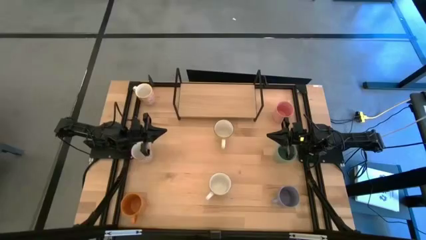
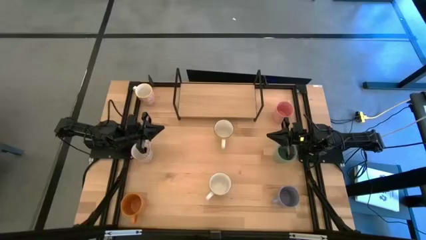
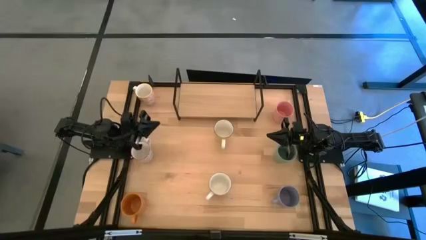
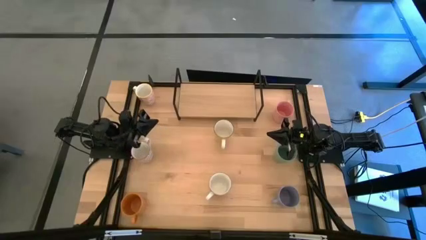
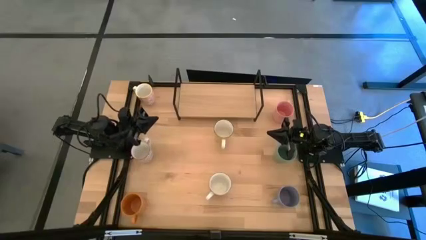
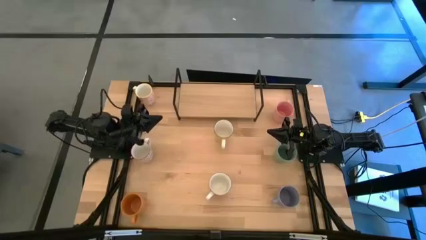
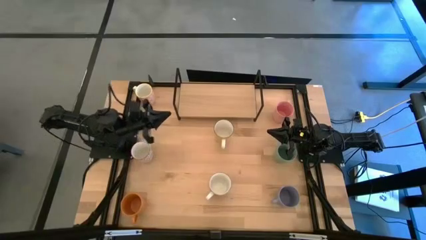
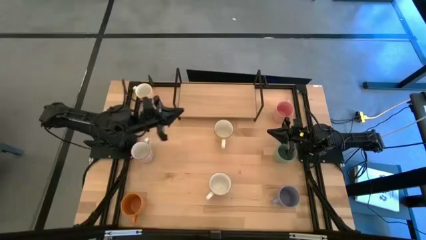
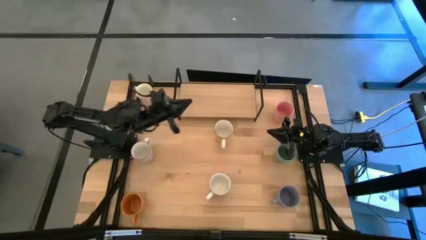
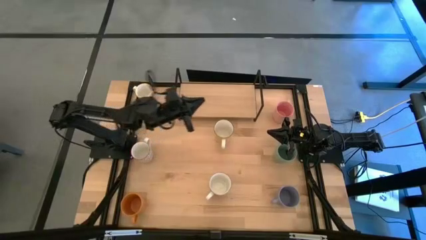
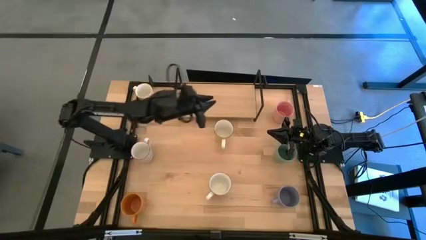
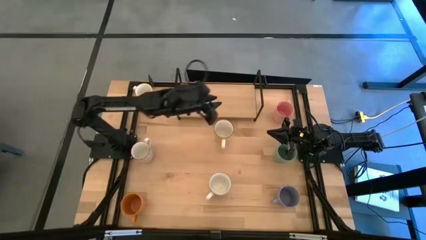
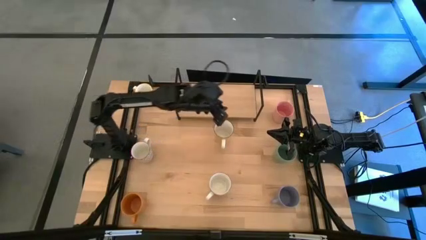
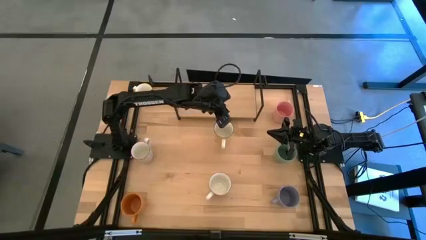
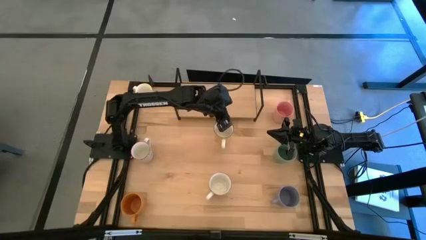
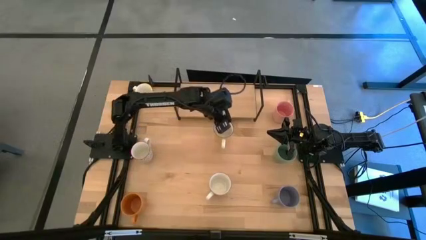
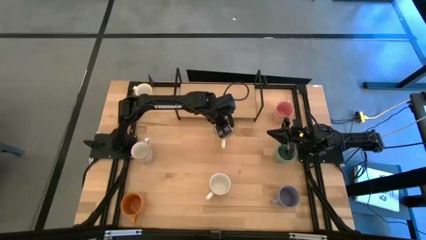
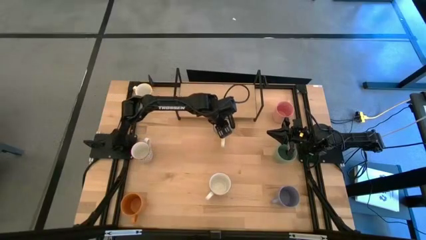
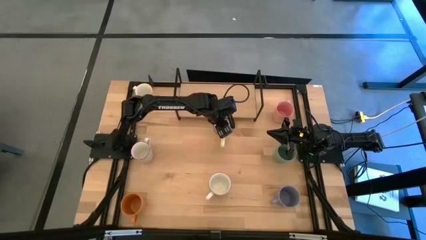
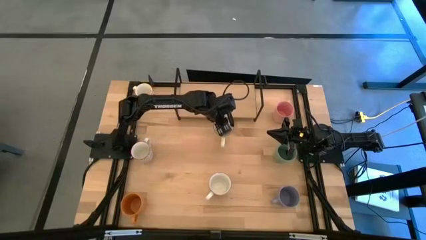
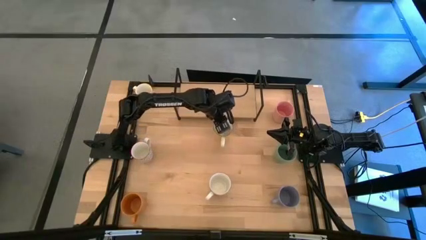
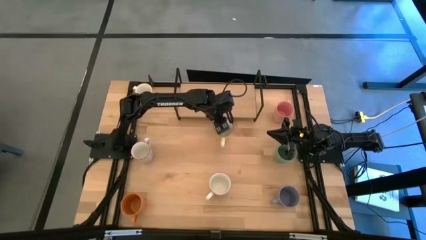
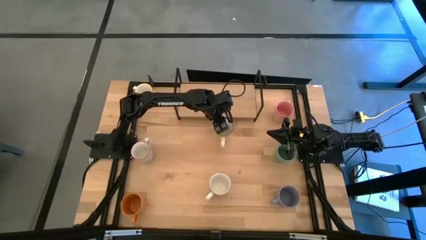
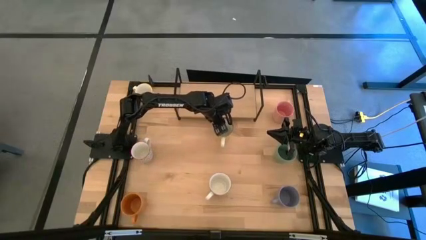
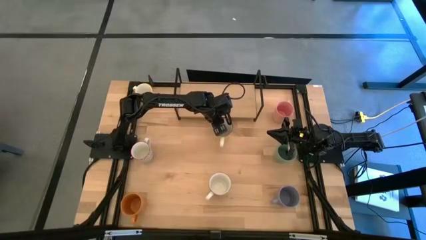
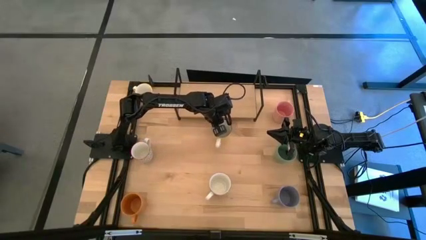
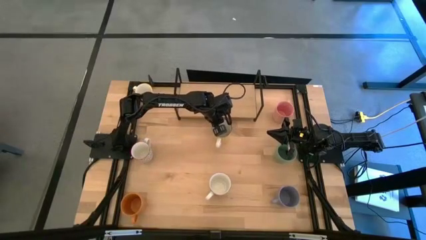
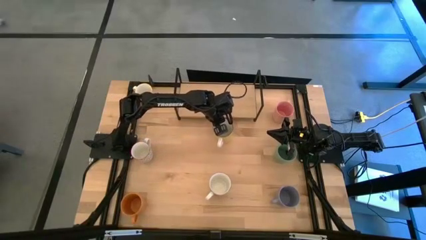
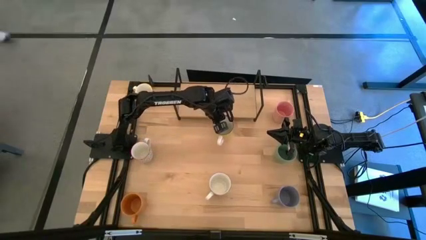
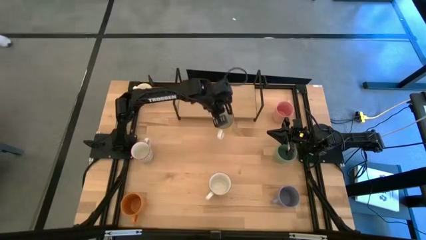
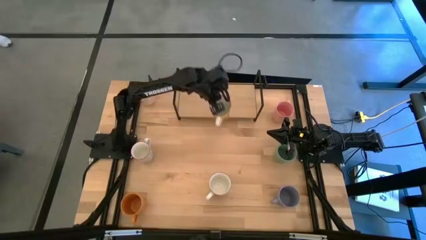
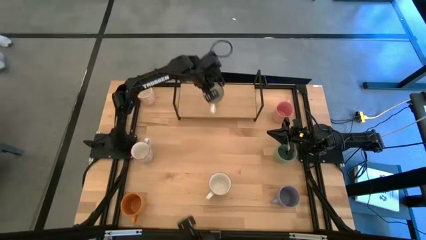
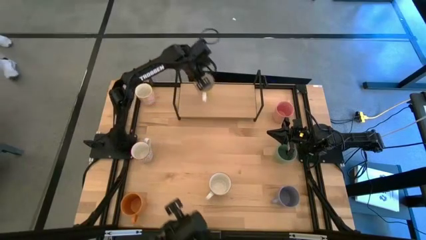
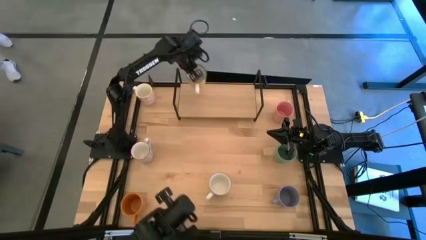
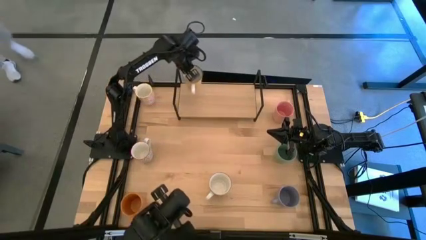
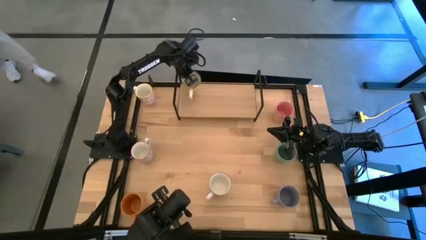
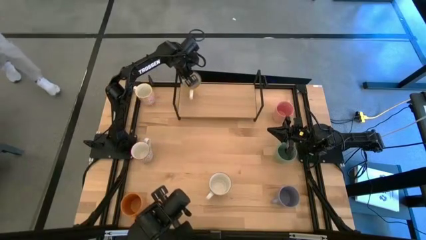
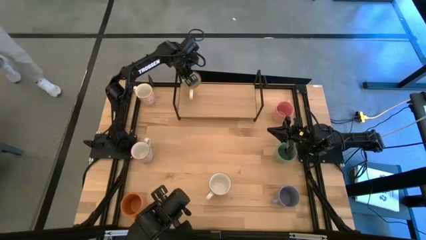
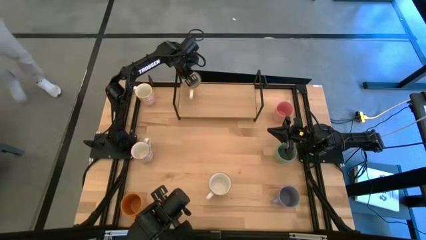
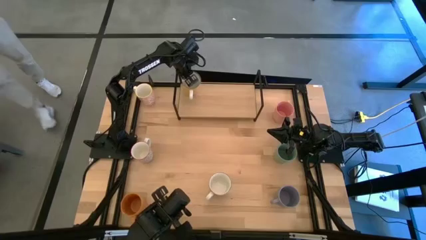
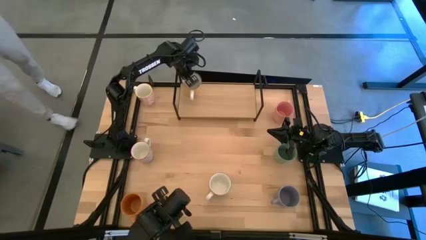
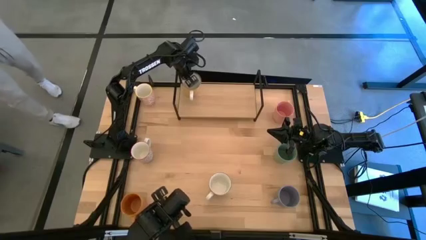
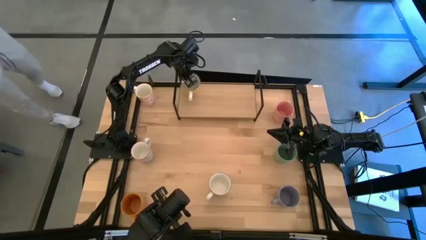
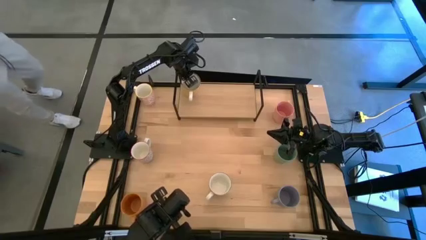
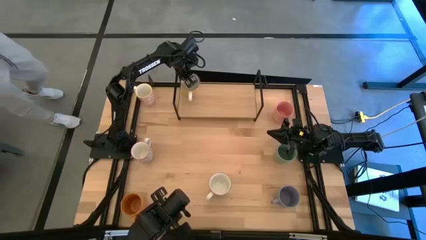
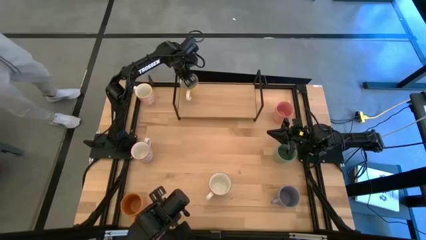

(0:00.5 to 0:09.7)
Task: Place coffee mugs
Put the yellow mug on the shelf

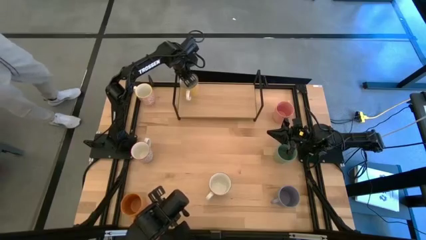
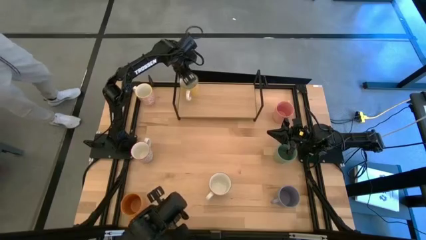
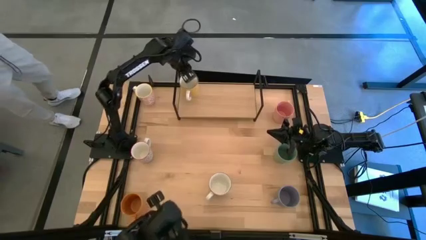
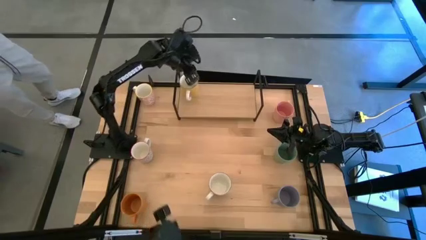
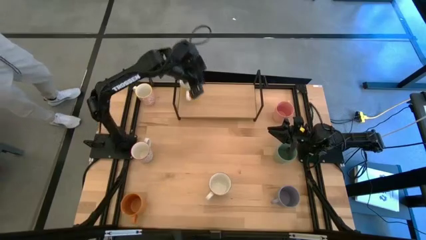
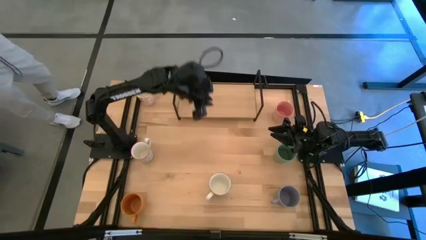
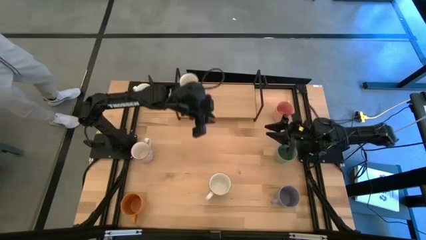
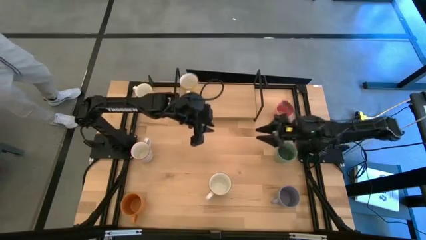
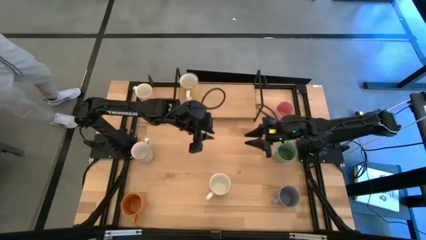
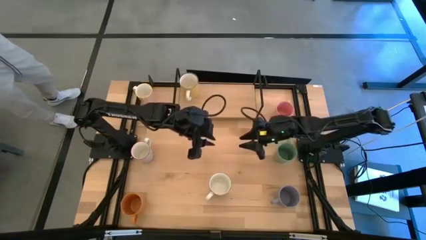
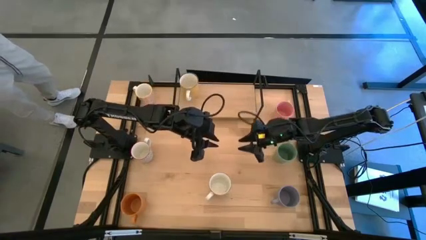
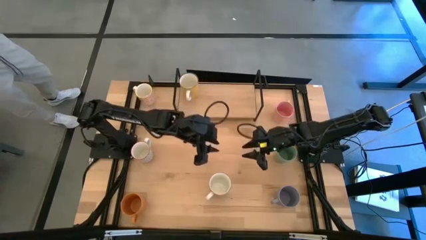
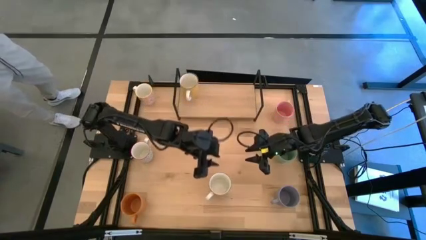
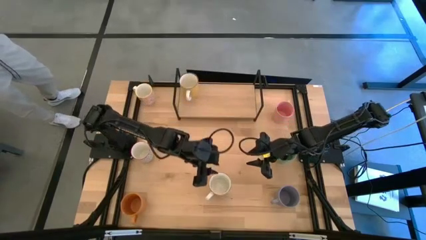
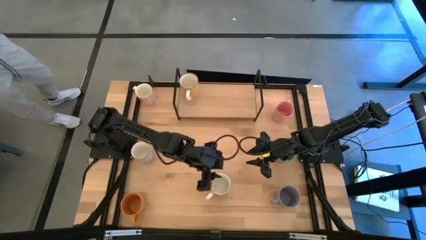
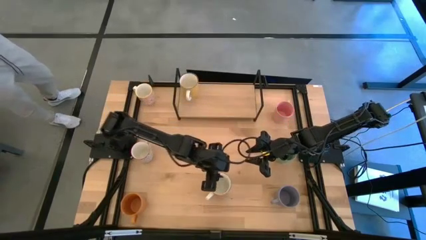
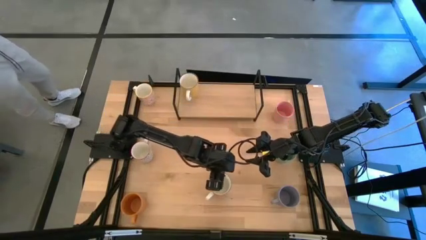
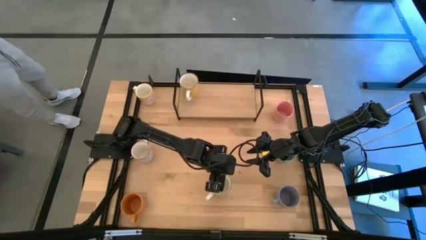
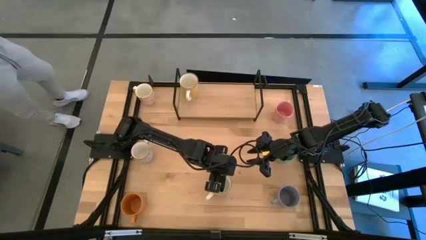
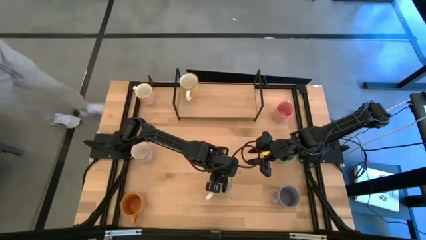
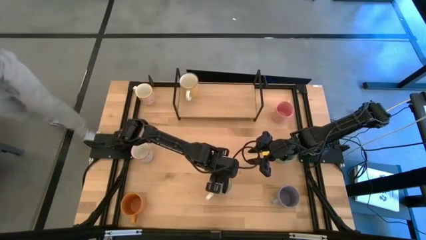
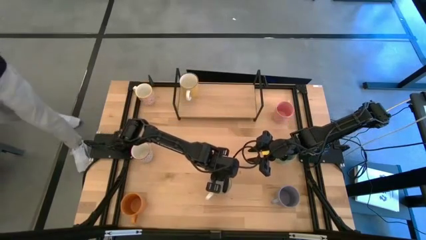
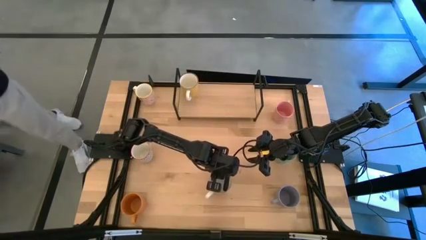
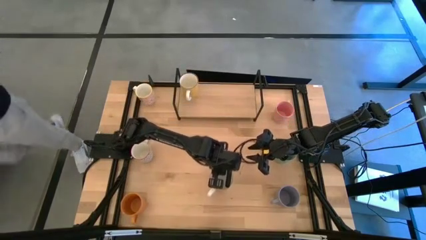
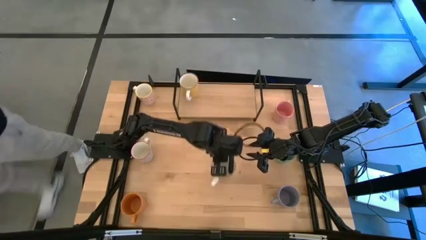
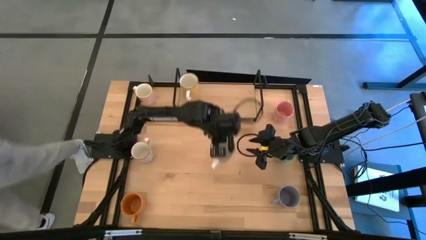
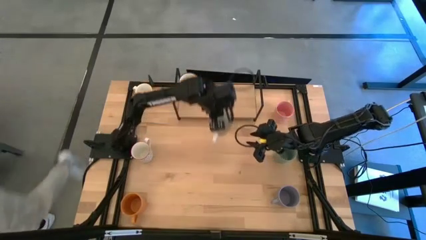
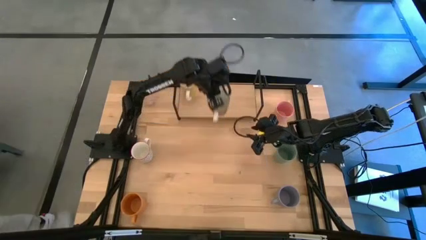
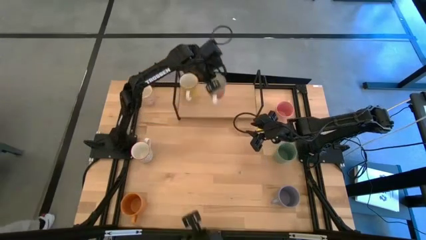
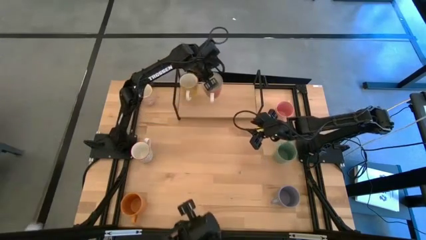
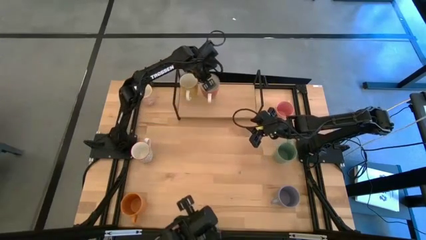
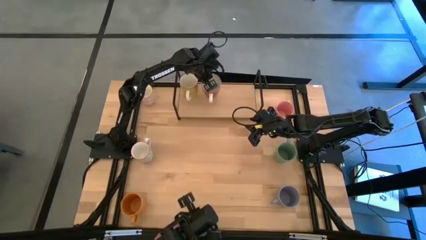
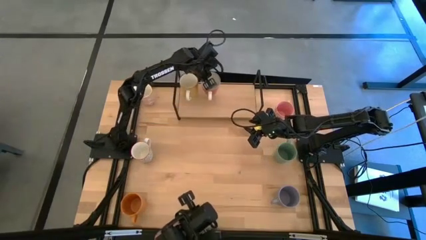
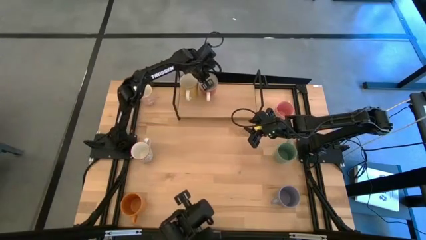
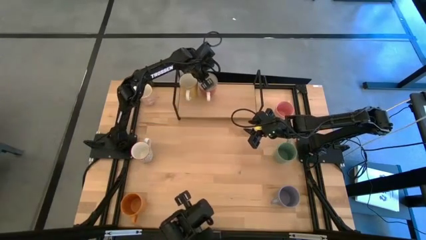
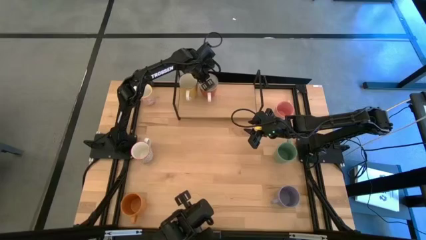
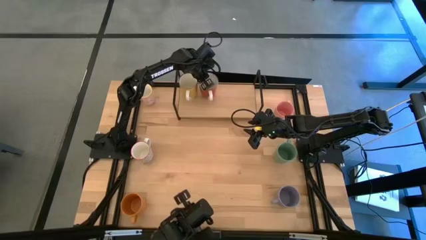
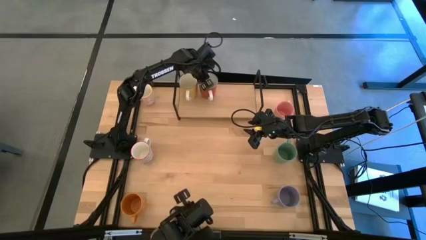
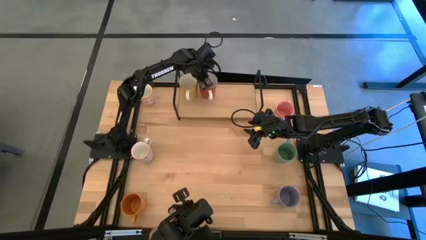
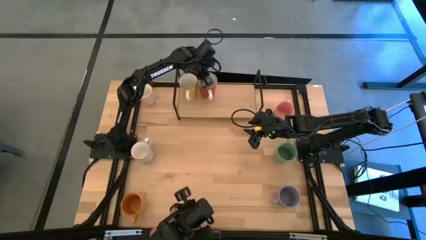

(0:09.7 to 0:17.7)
Put the red mug on the shelf
